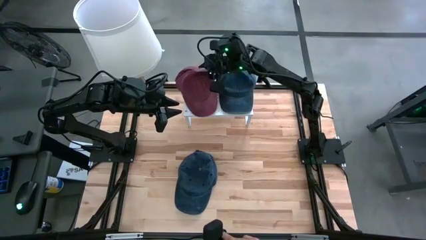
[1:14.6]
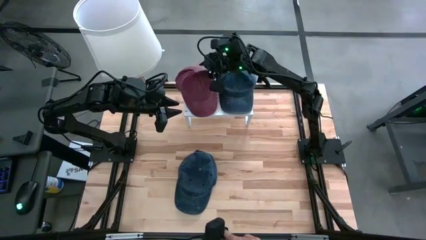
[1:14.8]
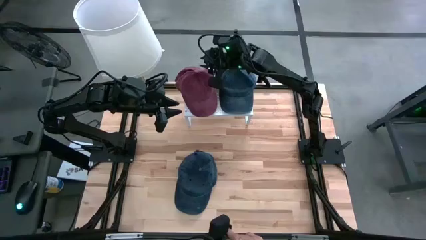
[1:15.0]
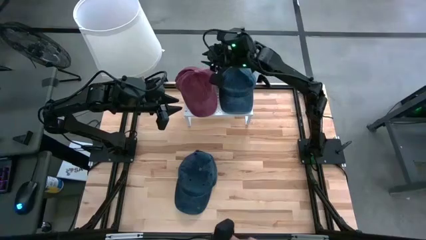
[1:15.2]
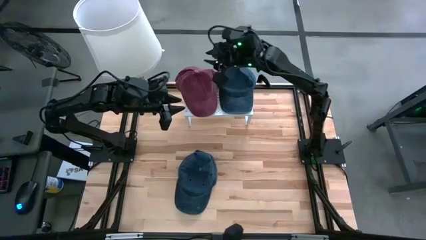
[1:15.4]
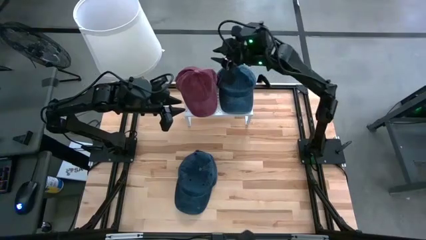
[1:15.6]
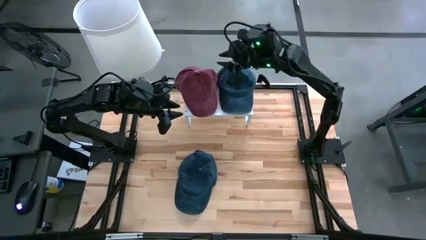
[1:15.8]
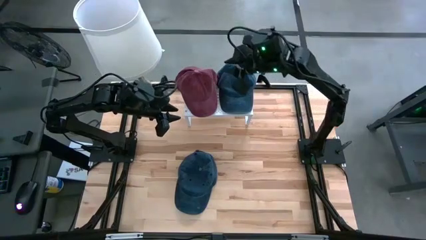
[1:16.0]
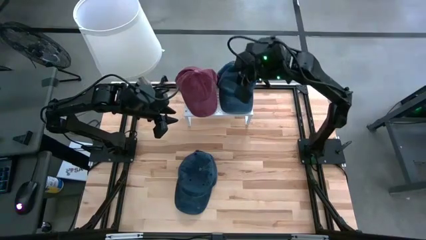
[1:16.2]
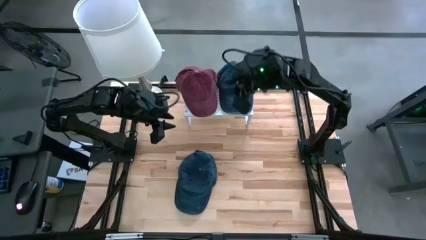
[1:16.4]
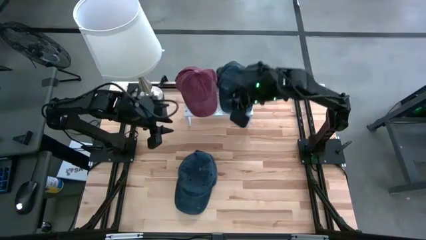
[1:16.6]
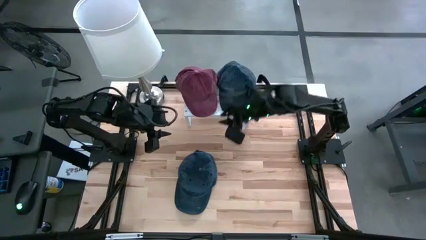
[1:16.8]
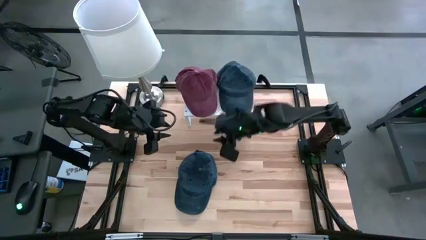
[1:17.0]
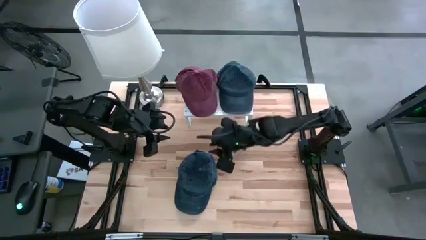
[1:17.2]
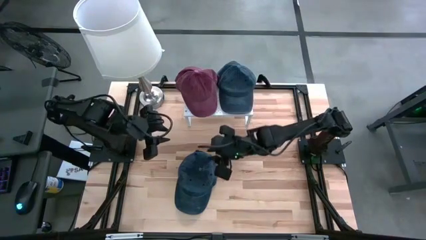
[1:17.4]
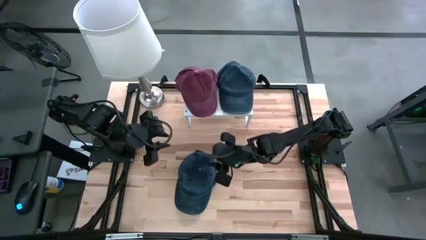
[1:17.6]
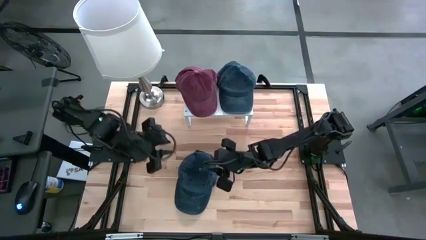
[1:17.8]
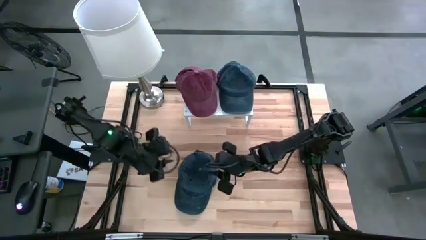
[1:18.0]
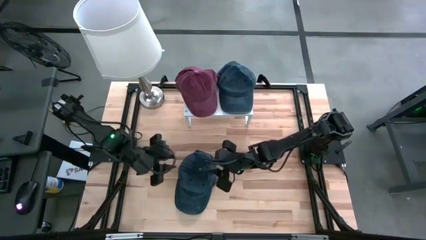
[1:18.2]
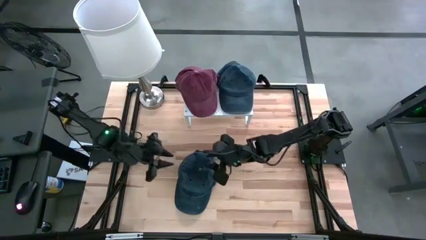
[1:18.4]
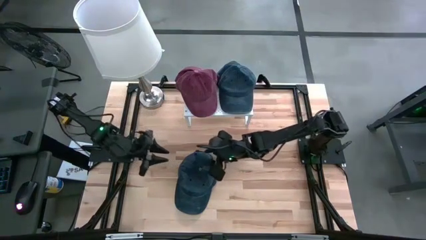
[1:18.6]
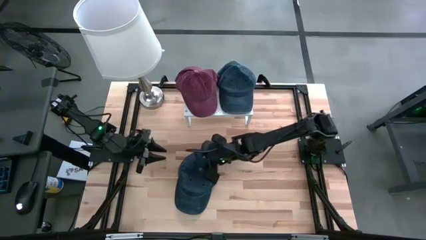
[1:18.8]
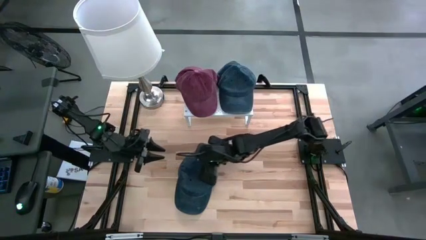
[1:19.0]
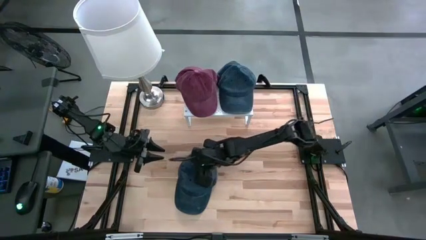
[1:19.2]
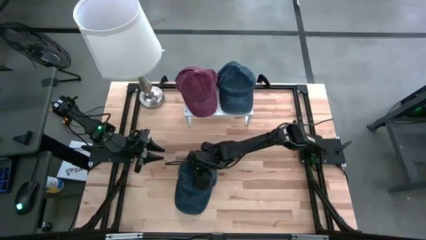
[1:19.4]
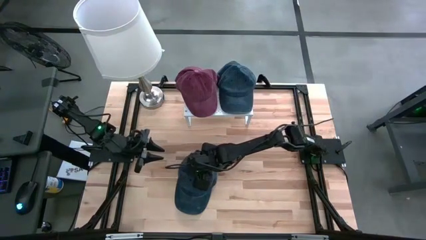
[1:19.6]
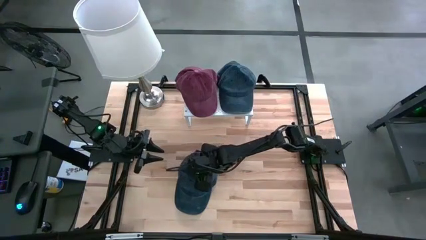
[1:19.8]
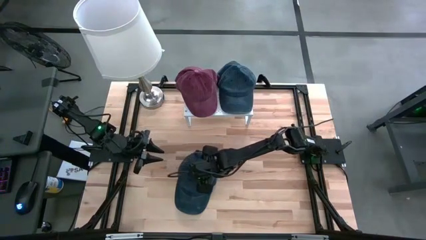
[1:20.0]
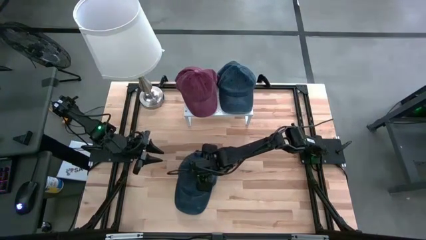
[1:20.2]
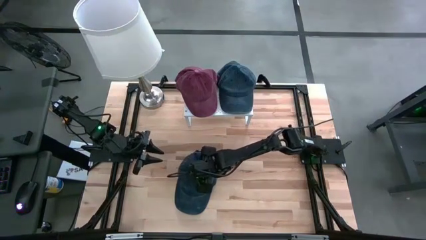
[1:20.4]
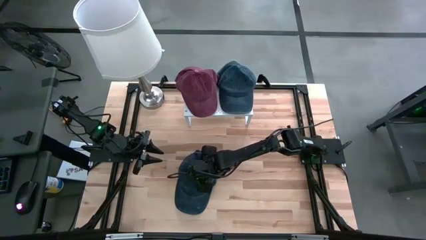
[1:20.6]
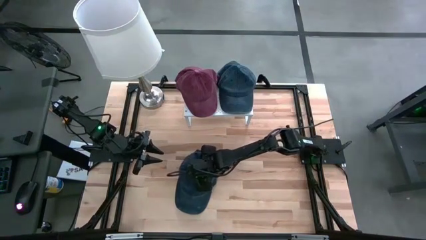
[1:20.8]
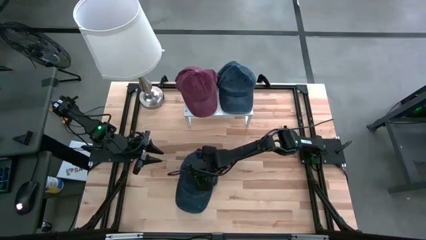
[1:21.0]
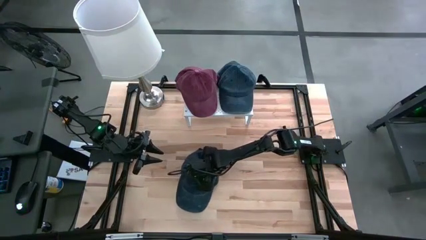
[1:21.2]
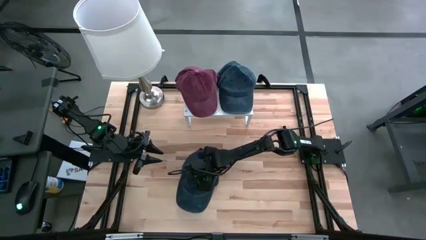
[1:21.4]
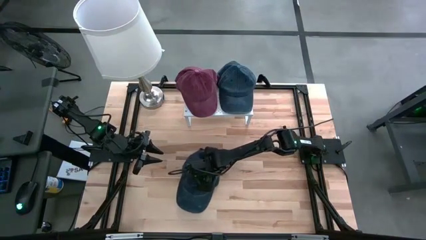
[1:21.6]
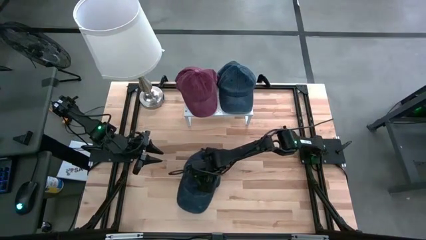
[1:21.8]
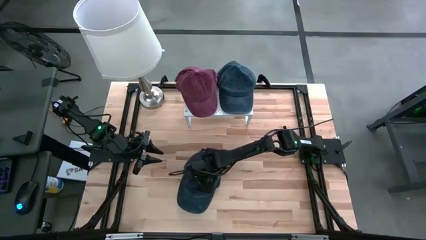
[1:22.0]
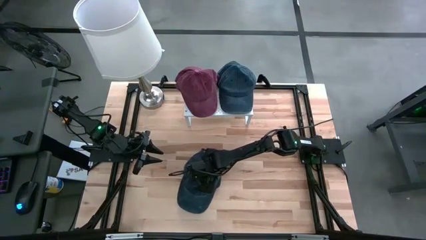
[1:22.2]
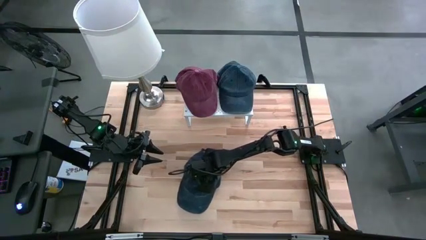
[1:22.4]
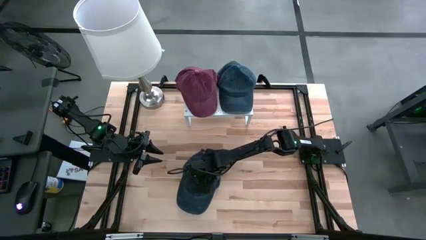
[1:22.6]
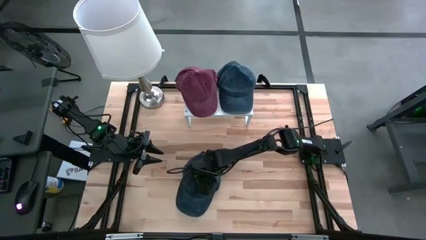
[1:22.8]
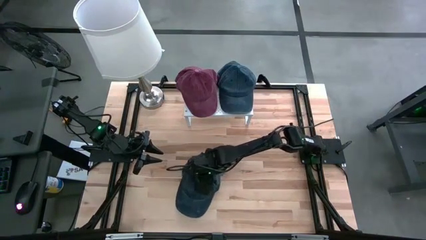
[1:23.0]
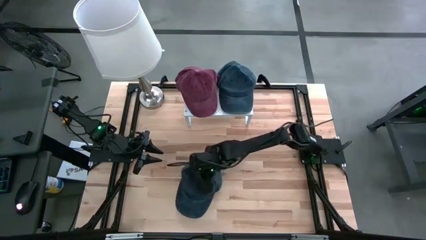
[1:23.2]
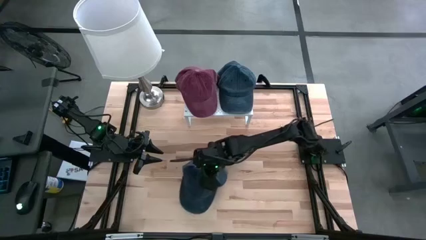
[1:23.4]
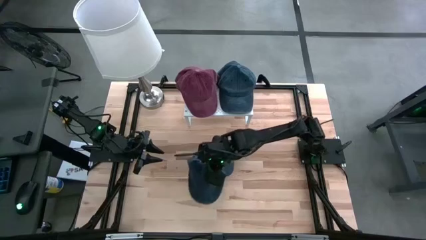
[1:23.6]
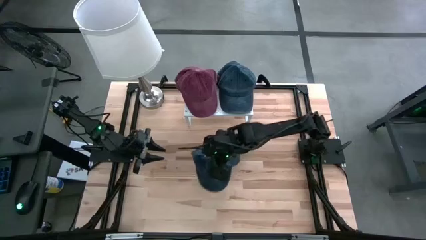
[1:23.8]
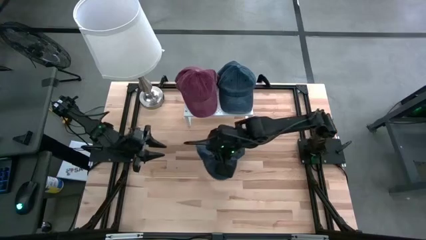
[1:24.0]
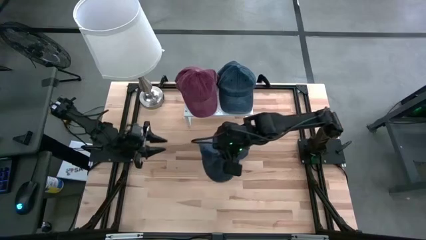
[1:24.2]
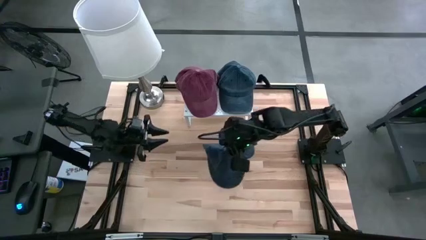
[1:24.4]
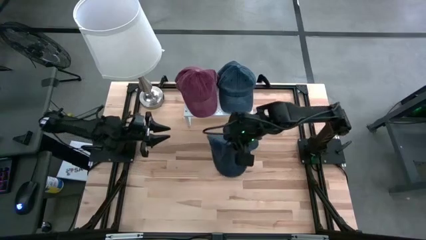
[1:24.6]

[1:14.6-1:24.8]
Task: Pick & Place hat
Stack the blue cap on top of the blue cap on the shelf

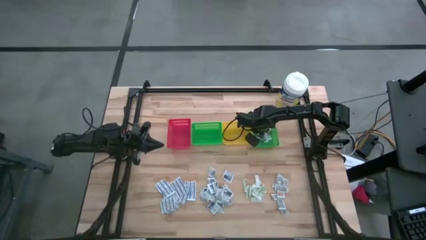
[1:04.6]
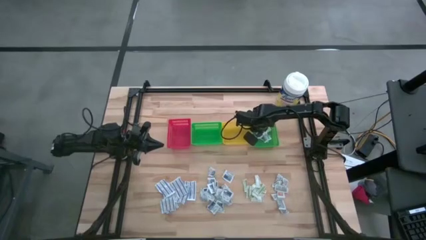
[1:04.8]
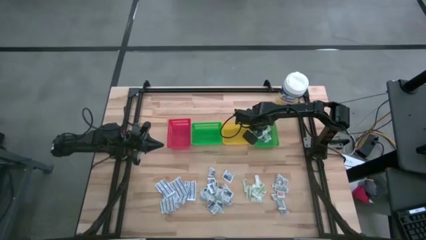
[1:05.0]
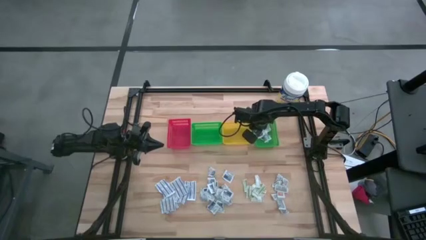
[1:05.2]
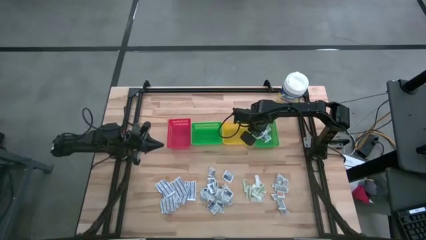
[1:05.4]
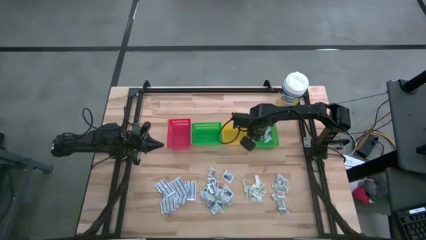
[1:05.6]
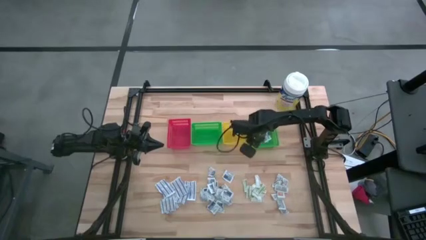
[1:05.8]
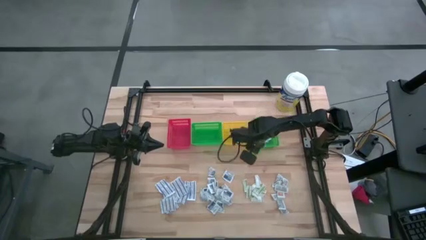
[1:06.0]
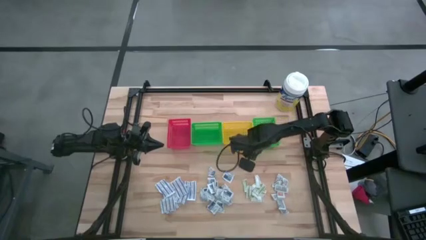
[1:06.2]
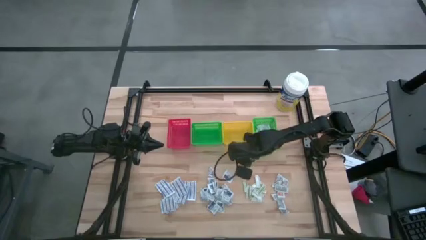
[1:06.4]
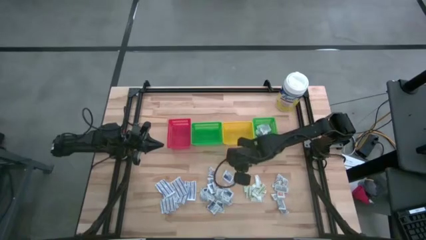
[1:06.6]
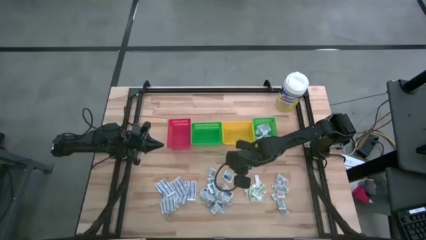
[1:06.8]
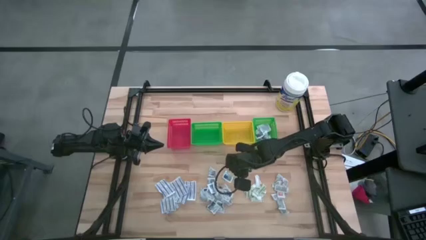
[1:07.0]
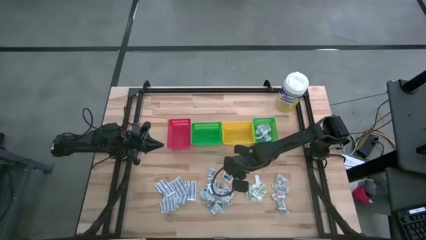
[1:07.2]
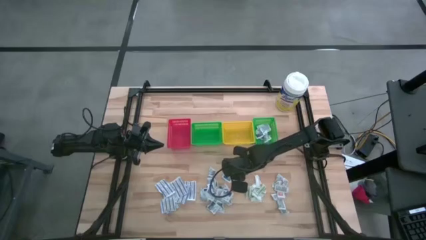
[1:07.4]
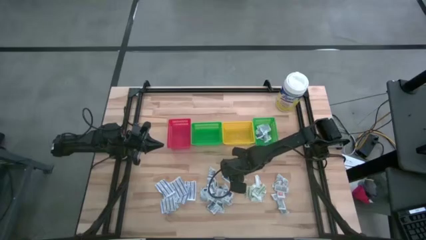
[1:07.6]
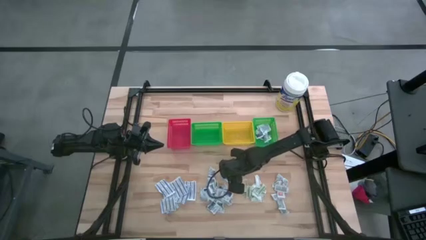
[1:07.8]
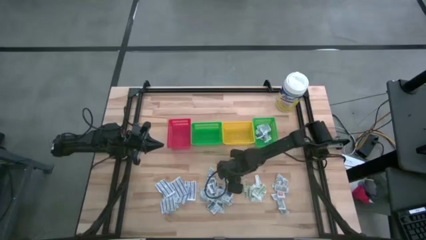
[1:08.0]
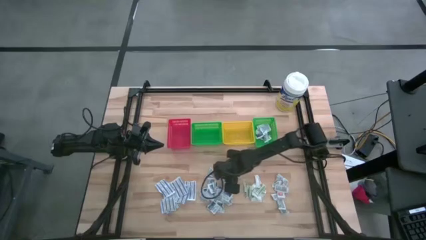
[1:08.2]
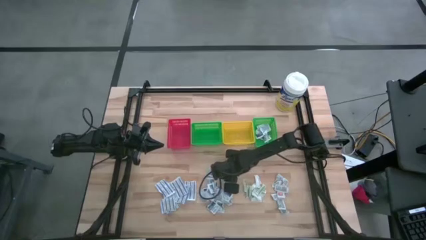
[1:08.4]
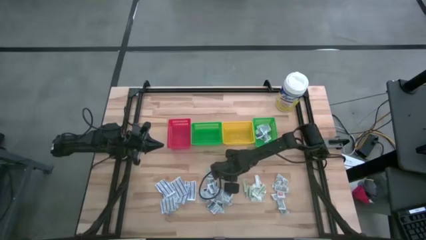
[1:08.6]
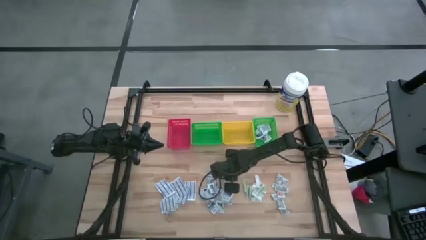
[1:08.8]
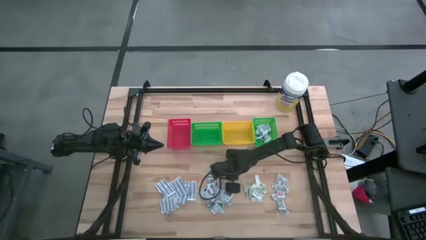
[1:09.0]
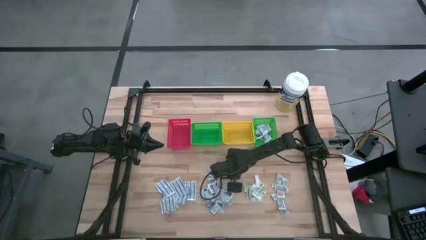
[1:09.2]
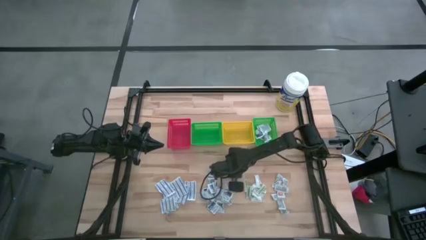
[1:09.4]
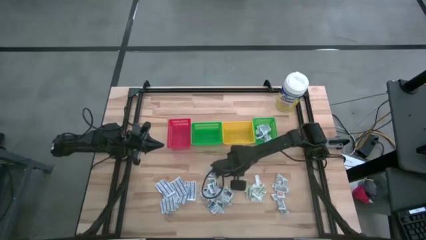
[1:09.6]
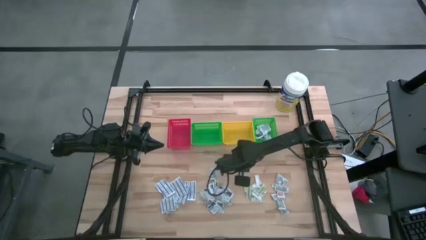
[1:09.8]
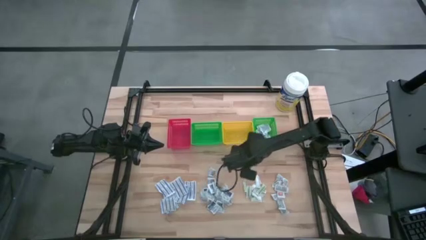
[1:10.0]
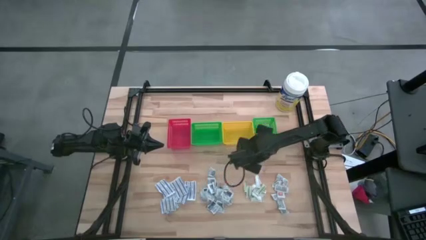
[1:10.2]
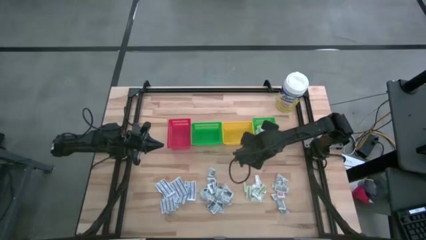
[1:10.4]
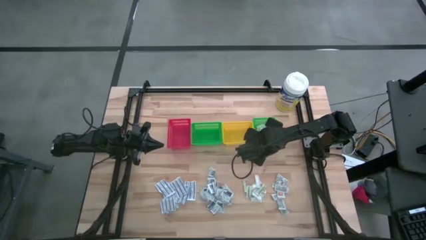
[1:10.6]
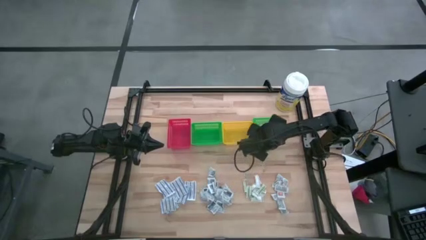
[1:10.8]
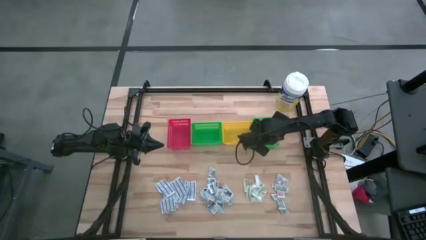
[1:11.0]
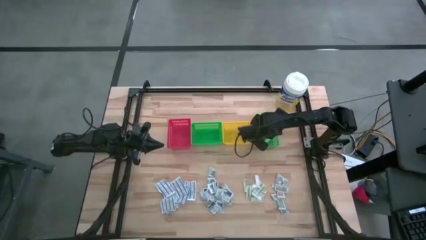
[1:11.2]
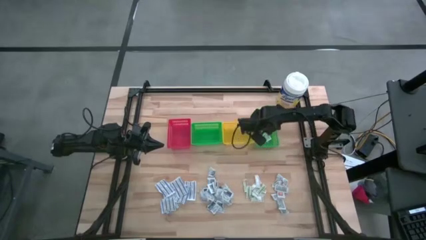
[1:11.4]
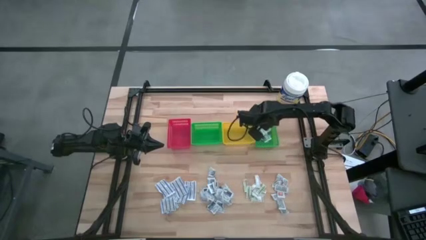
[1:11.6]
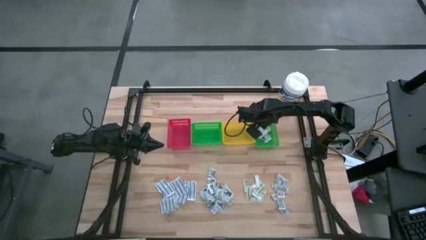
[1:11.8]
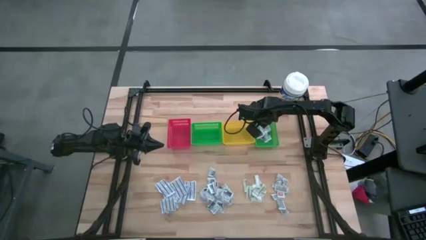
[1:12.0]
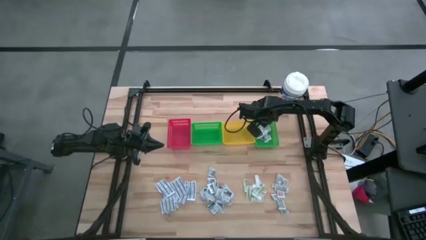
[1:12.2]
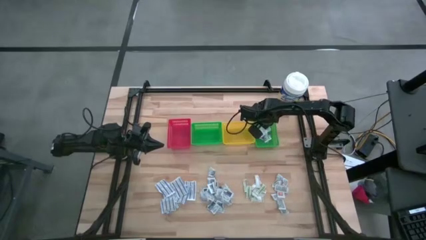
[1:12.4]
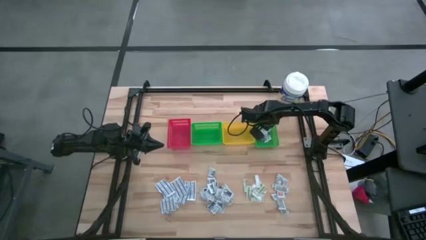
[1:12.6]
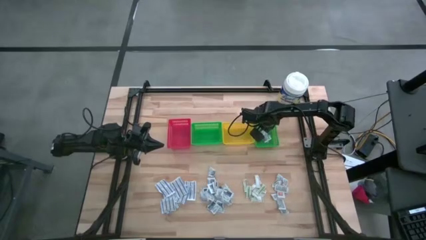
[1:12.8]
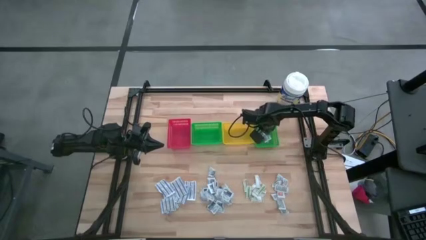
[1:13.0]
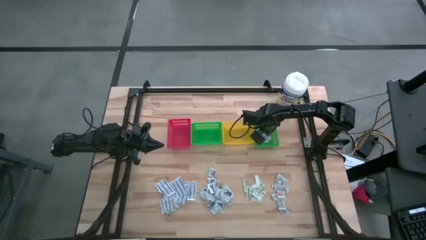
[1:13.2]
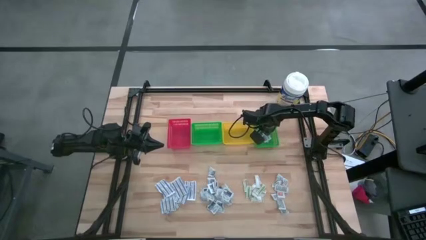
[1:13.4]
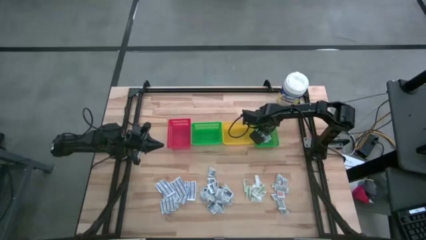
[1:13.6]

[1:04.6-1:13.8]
Task: Pick & Place First Aid Supplies
Put the blue alcohol pad into the right green bin
